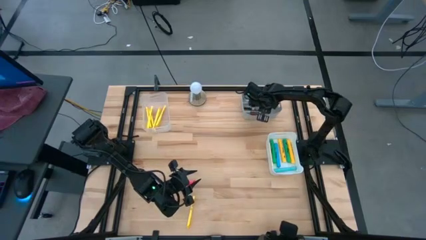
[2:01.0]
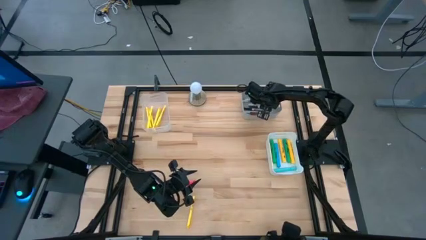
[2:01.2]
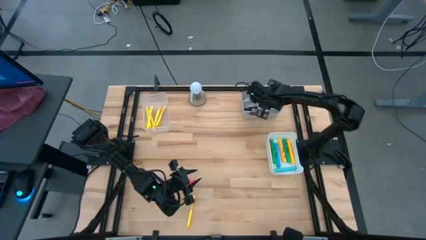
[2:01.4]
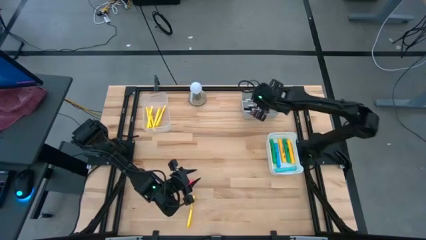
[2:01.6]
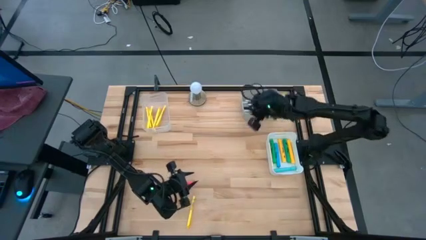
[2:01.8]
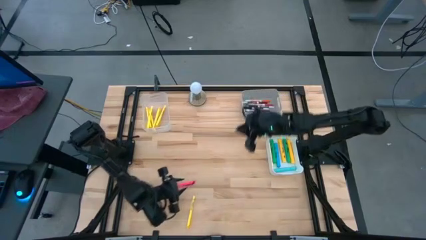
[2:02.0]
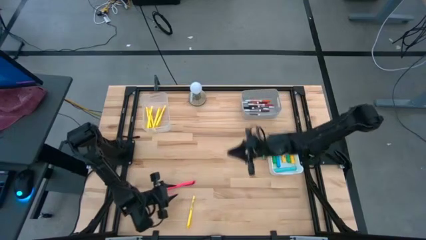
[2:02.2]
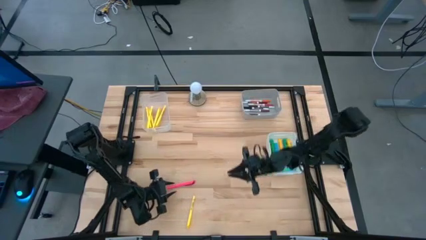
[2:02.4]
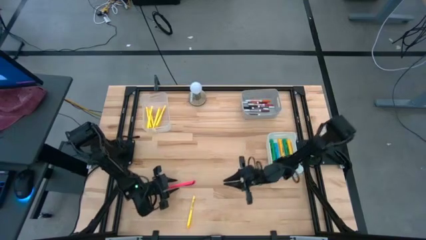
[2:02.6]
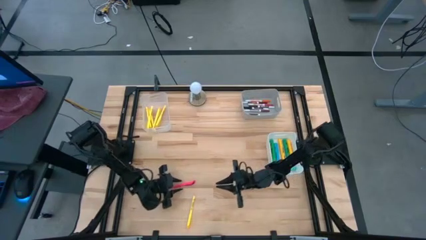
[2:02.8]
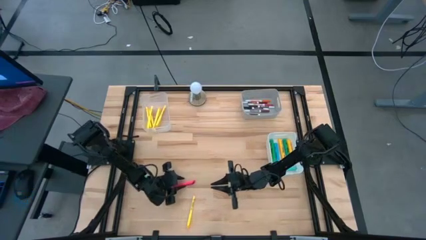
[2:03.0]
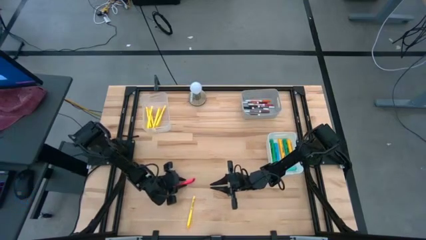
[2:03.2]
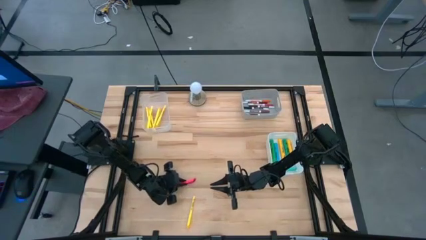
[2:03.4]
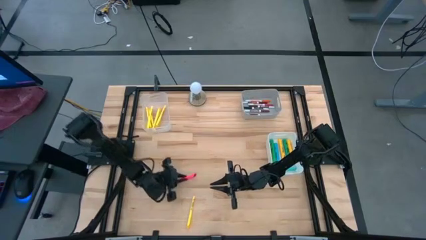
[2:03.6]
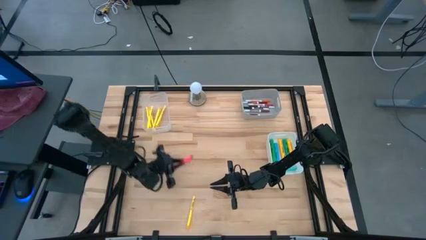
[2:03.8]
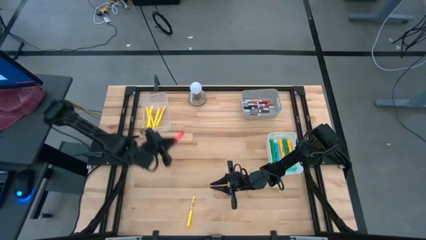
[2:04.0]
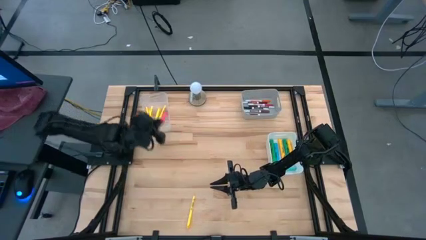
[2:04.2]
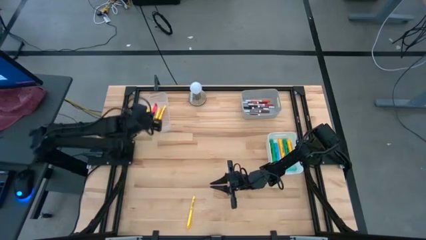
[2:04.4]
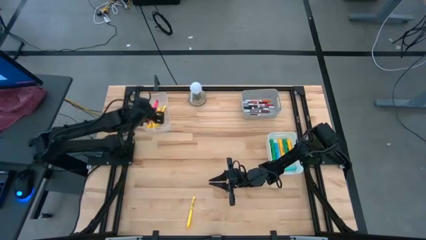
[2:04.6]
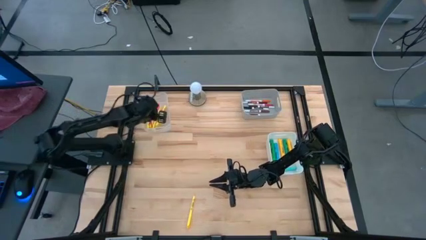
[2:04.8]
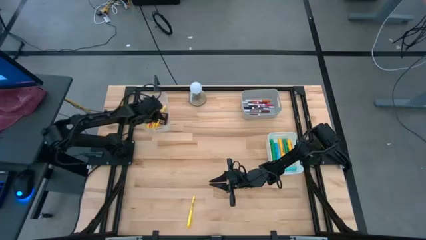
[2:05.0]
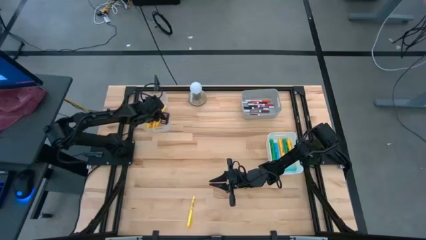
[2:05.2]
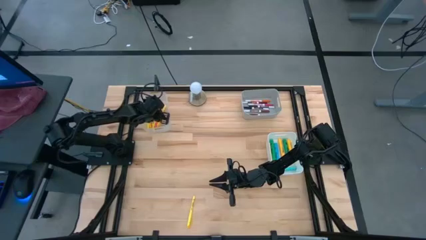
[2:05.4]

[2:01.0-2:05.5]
Task: Pick & Place Markers
Put the pink pen into the transparent bin

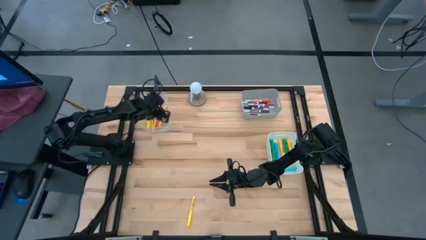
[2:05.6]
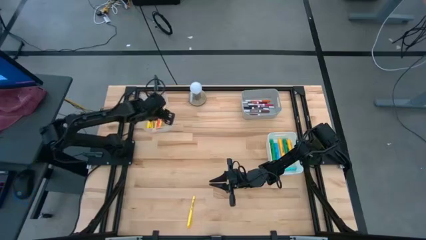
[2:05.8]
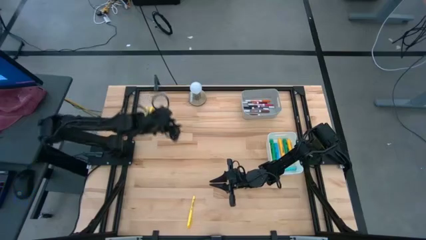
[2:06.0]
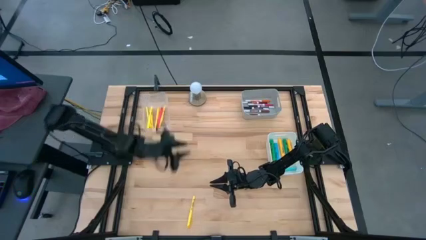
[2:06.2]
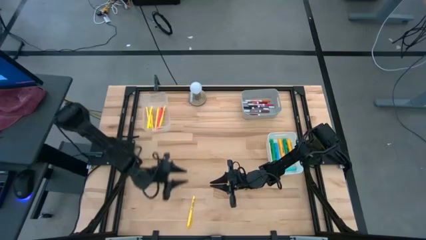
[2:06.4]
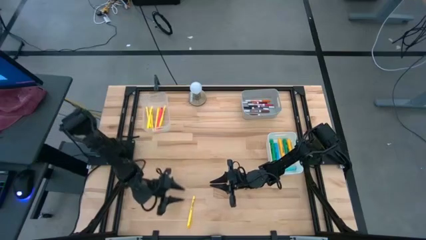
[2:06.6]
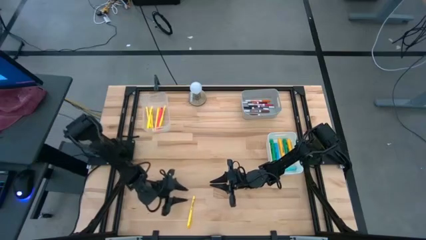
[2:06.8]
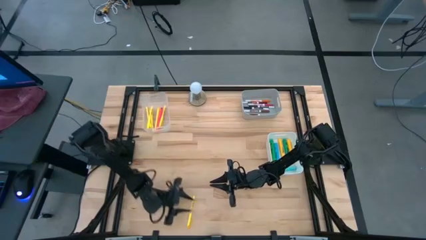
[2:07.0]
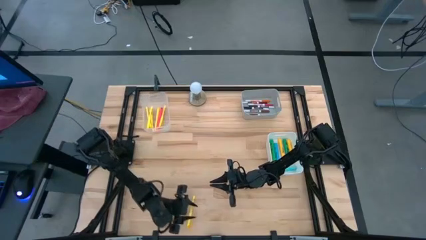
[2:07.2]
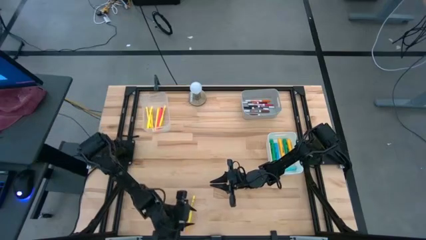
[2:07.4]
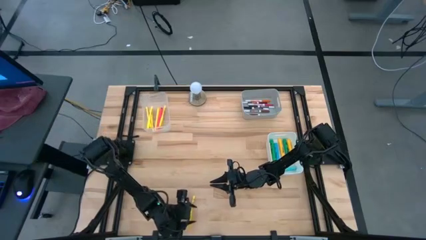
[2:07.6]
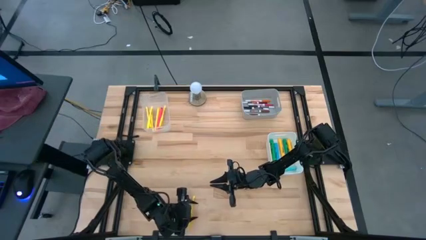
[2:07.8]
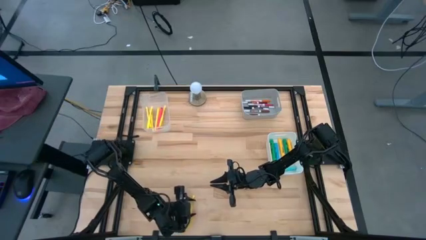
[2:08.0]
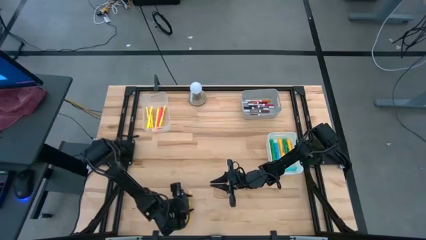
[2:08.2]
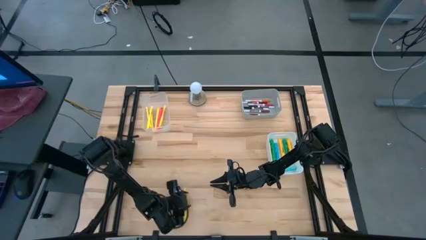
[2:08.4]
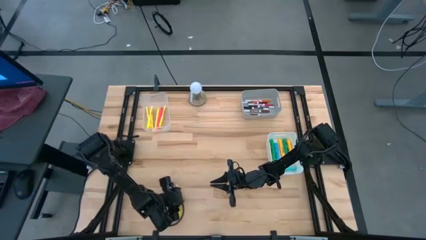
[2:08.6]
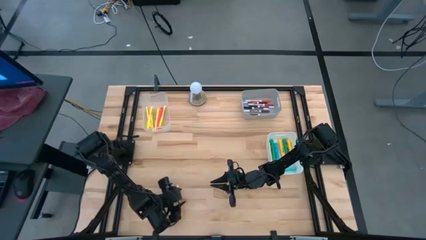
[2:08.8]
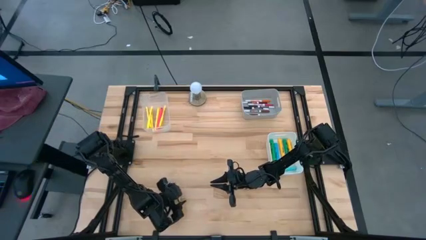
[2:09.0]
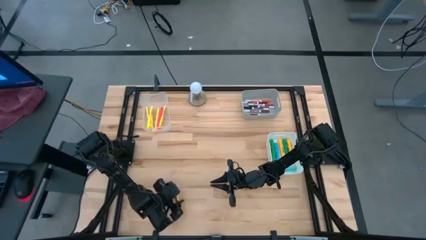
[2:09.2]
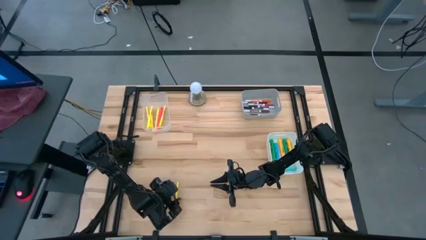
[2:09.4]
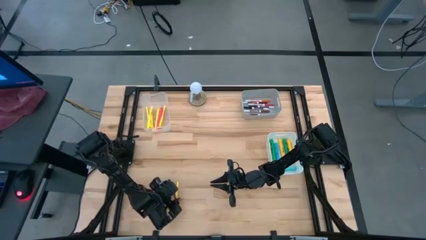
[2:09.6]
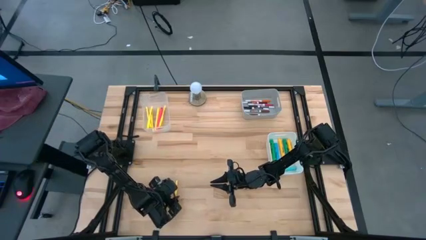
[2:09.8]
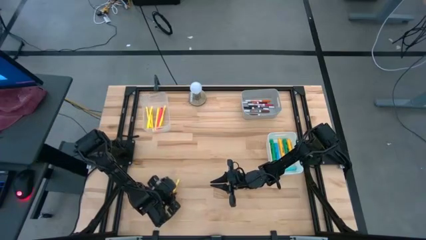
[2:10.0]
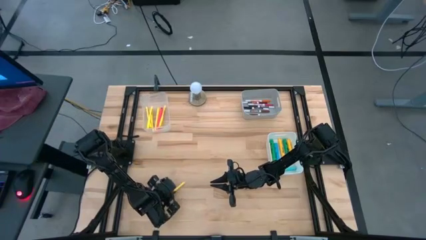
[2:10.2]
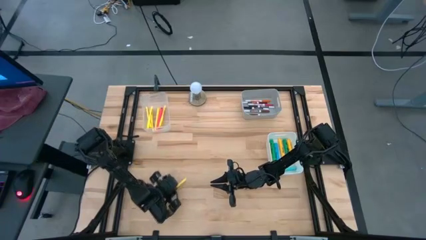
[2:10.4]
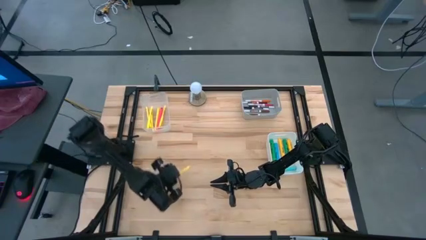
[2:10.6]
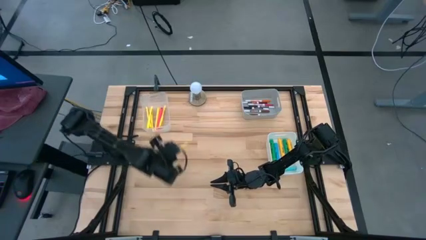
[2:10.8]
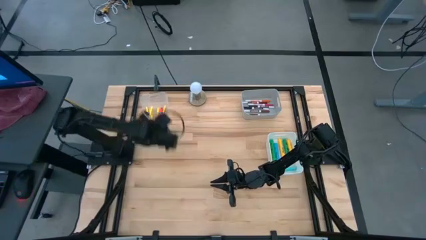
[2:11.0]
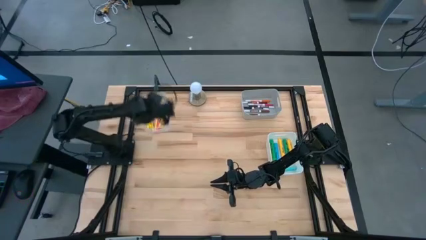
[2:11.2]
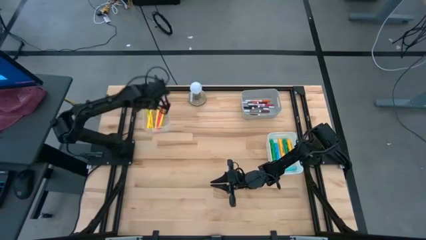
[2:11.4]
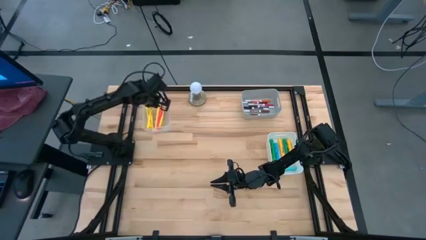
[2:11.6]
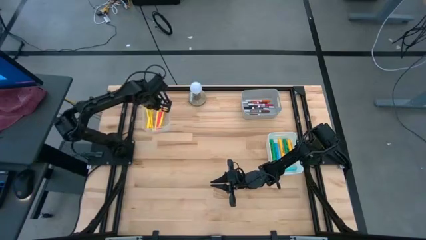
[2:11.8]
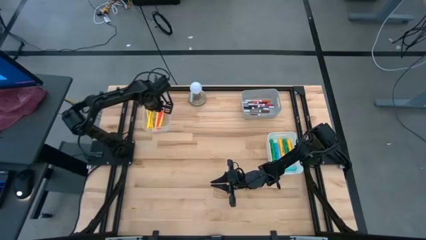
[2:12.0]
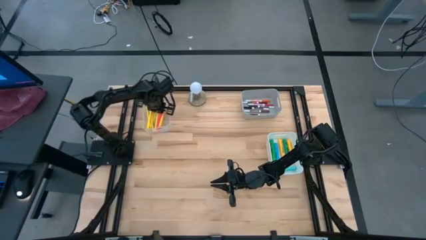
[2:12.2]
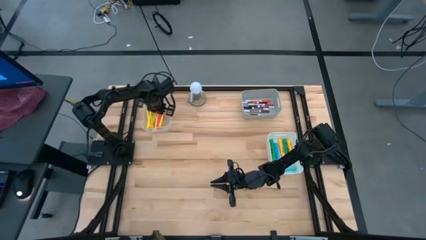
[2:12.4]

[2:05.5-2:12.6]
Put the yellow pen into the transparent bin

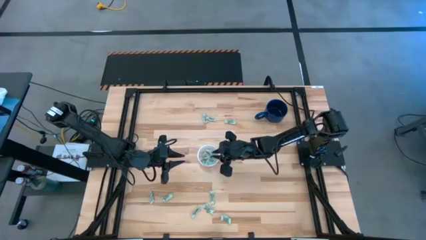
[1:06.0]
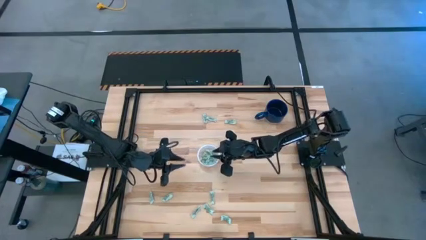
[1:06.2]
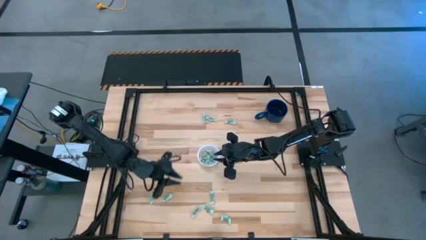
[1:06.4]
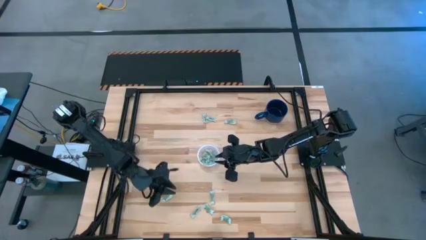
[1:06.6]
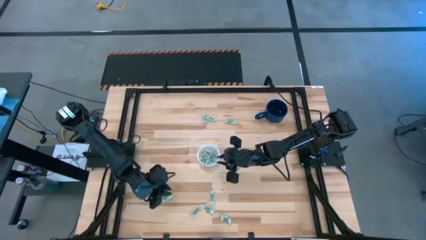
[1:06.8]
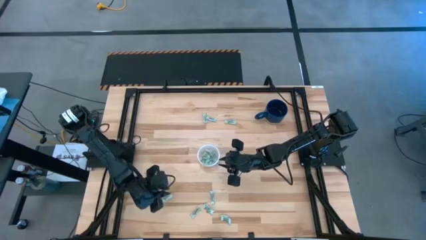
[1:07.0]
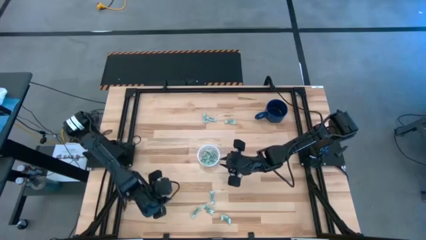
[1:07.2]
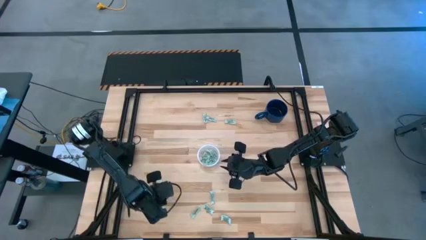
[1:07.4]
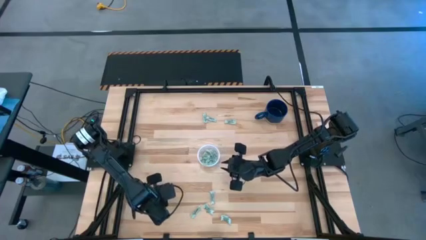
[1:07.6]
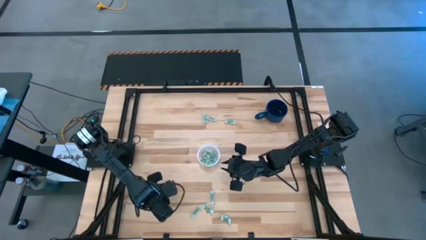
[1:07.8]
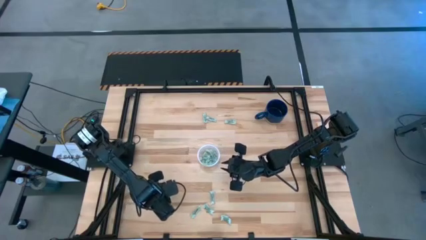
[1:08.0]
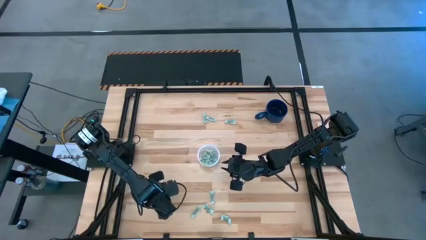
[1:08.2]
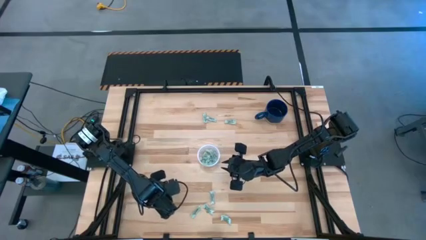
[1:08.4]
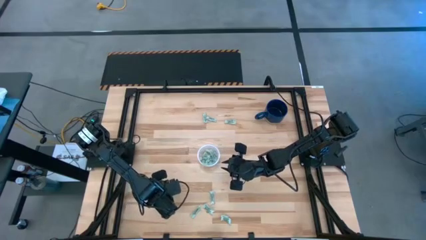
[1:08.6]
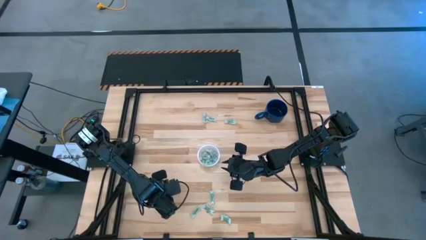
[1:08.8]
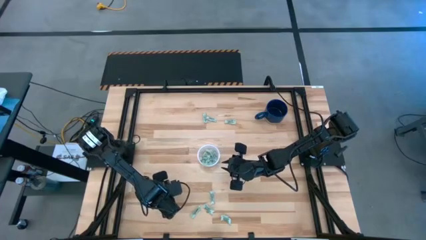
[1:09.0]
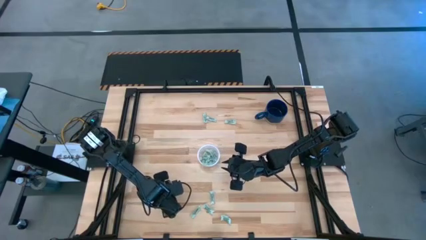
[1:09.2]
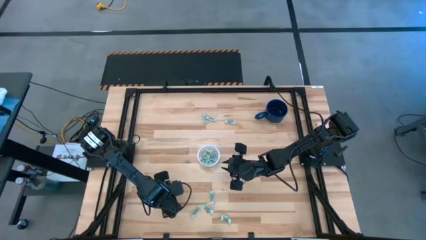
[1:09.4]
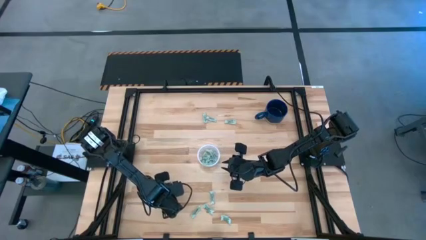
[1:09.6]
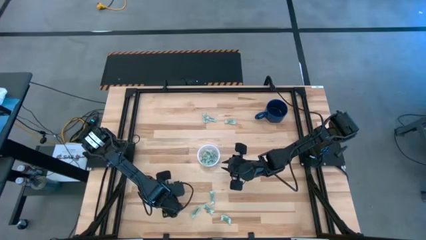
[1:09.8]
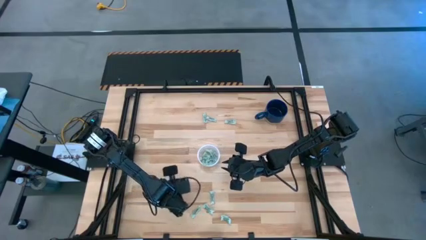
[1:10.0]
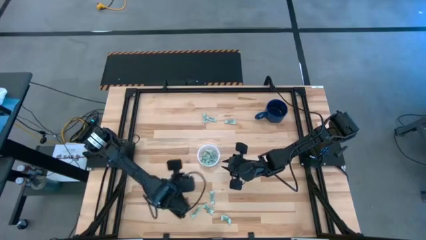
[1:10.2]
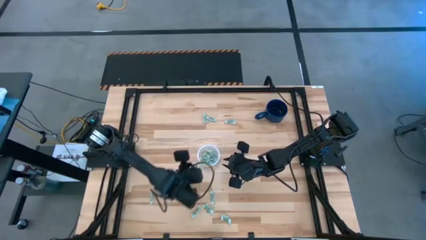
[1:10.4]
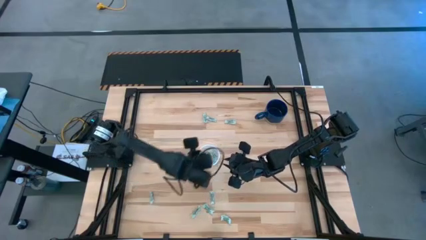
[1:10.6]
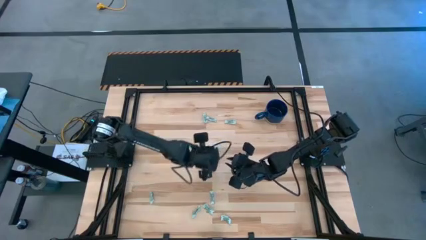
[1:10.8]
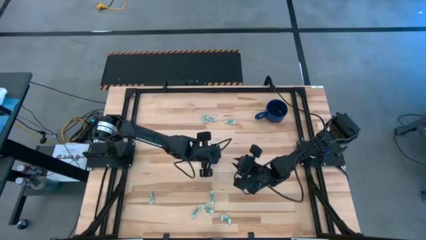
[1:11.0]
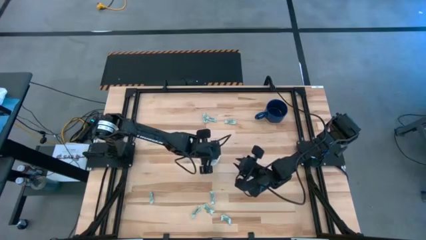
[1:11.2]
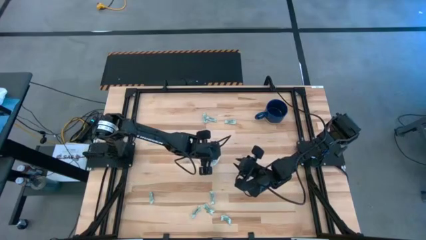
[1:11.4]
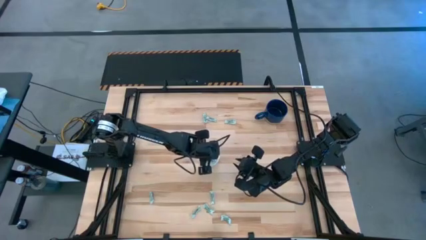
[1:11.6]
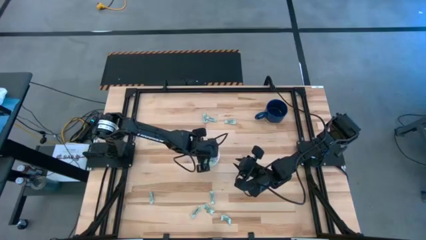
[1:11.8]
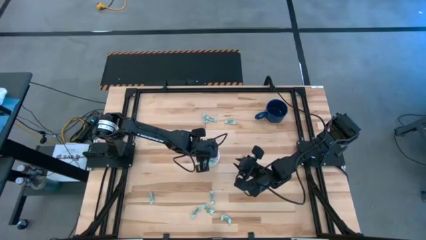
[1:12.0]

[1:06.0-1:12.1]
Task: Pick and place items into bin
Put the stevia packet into the transparent bin
